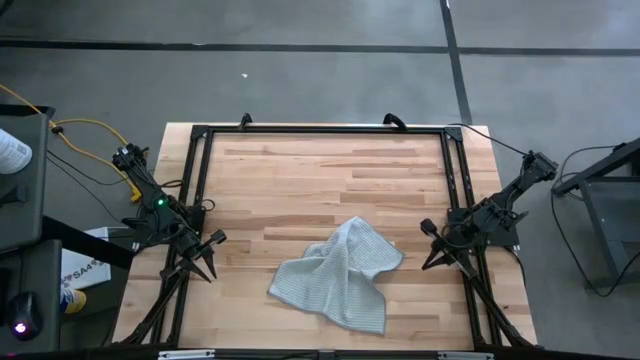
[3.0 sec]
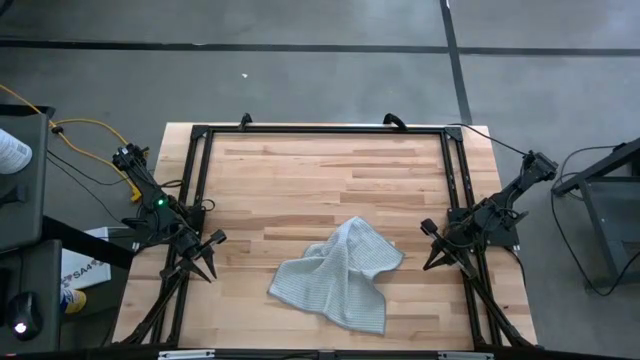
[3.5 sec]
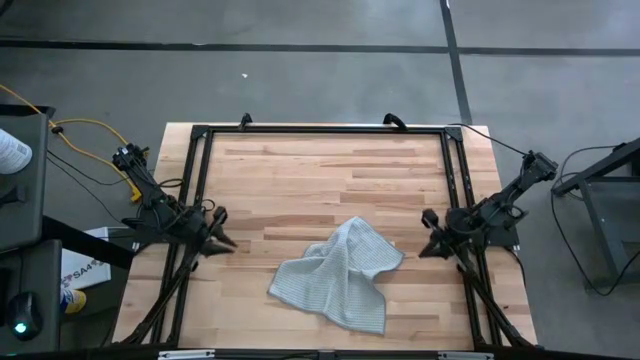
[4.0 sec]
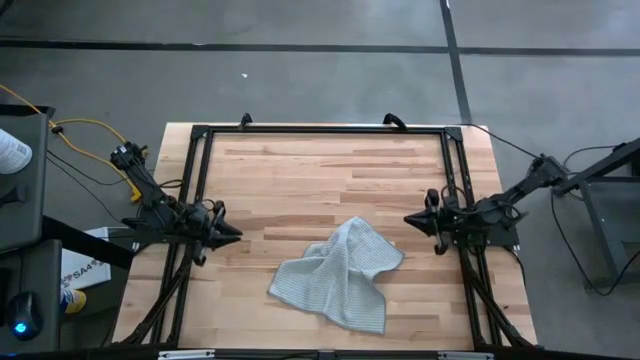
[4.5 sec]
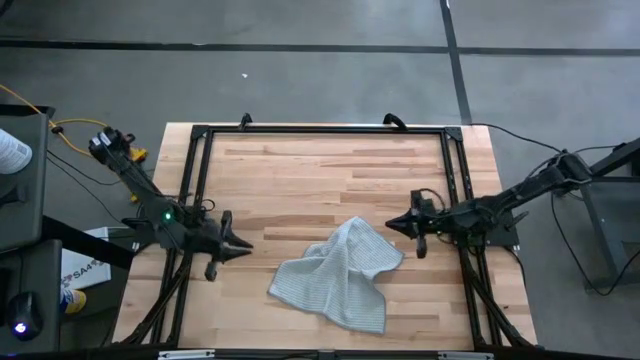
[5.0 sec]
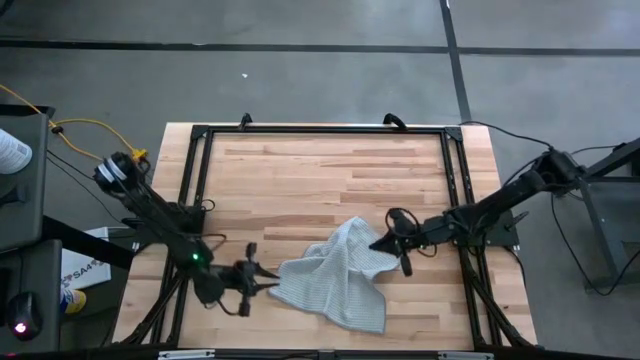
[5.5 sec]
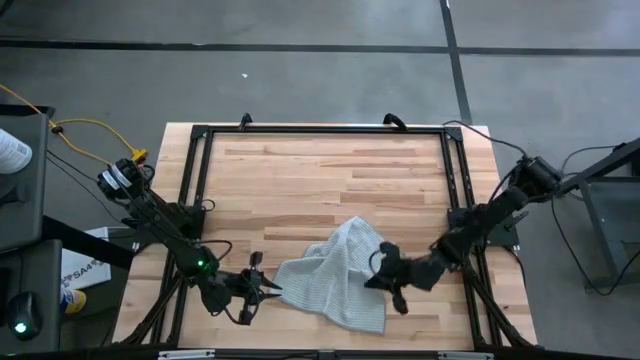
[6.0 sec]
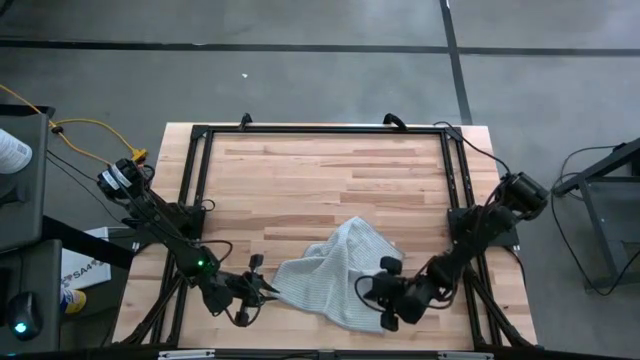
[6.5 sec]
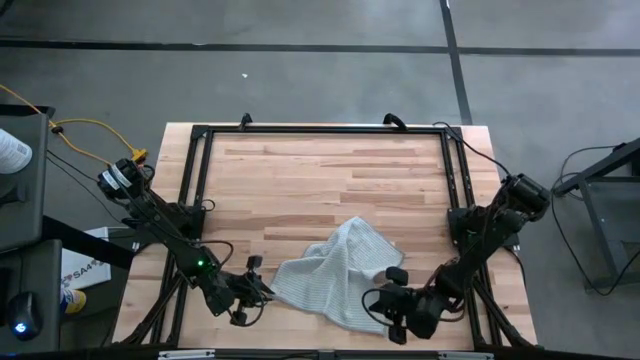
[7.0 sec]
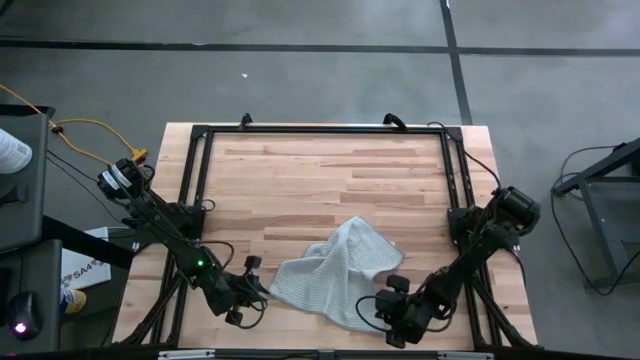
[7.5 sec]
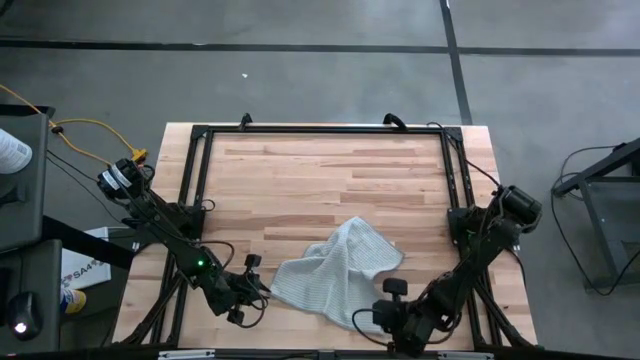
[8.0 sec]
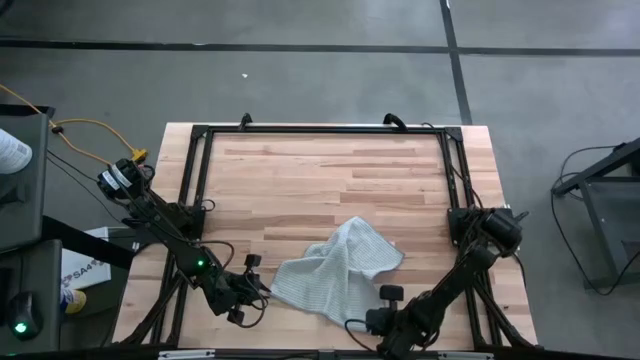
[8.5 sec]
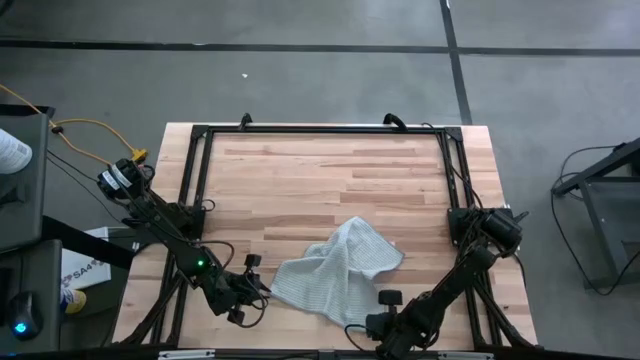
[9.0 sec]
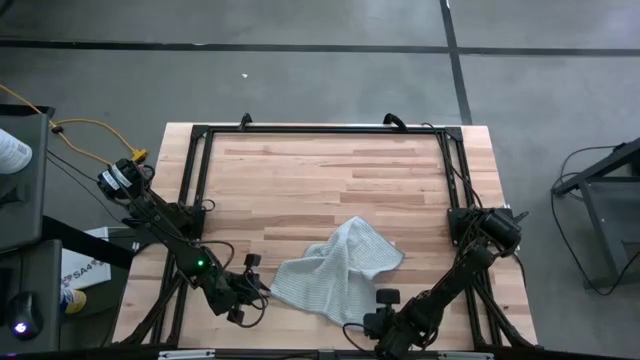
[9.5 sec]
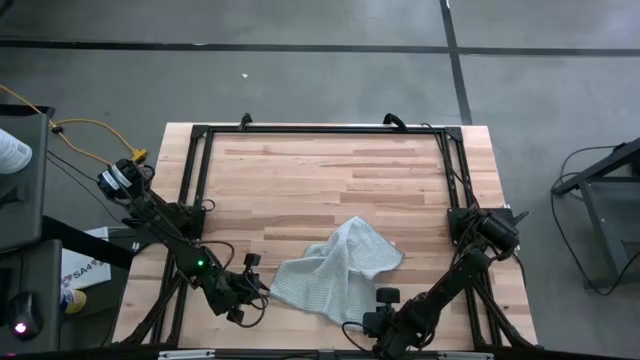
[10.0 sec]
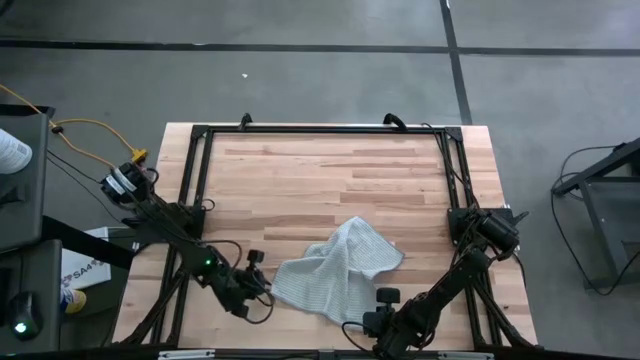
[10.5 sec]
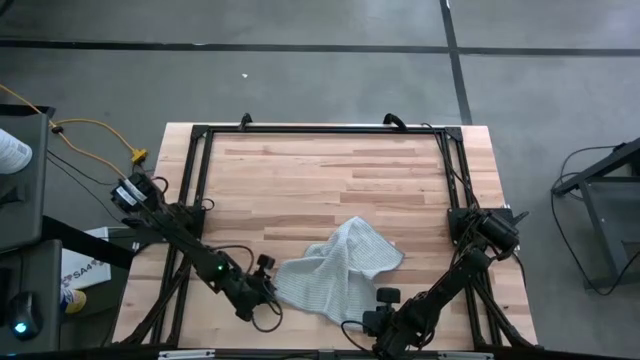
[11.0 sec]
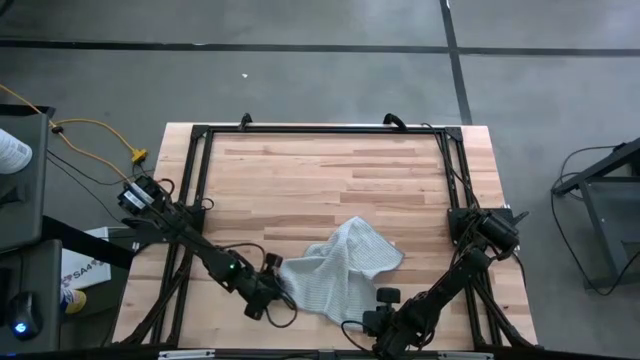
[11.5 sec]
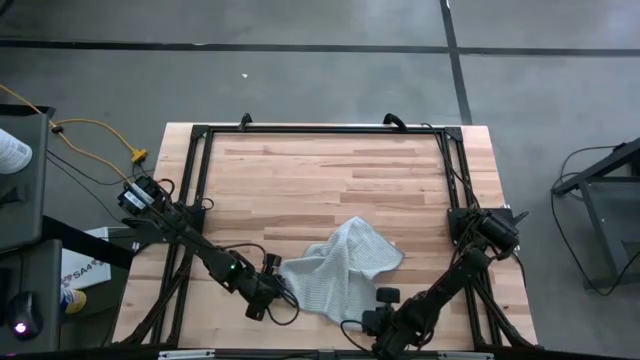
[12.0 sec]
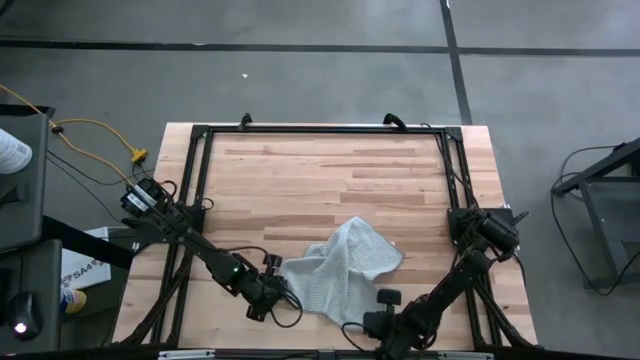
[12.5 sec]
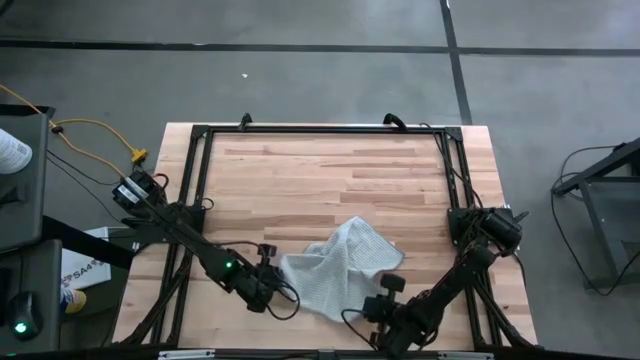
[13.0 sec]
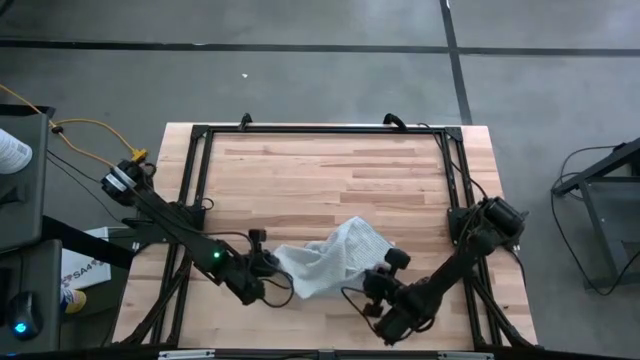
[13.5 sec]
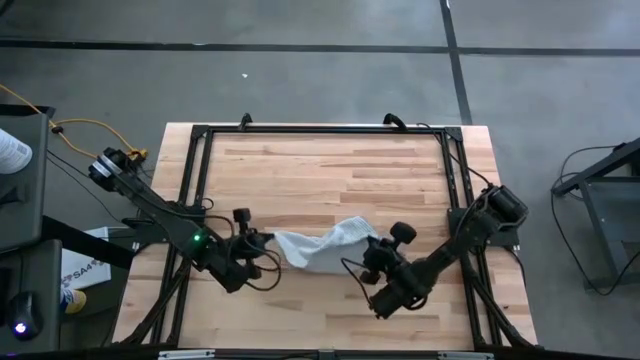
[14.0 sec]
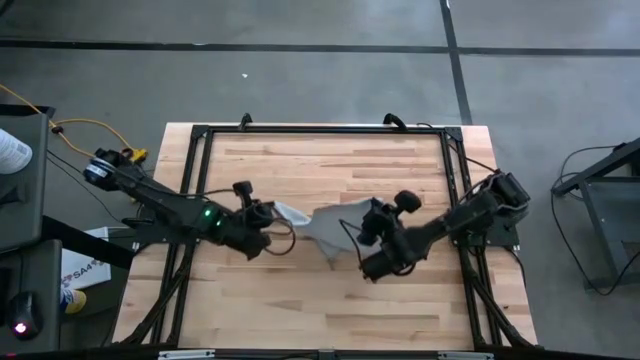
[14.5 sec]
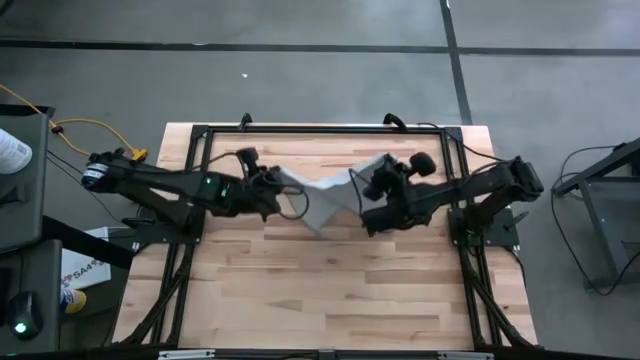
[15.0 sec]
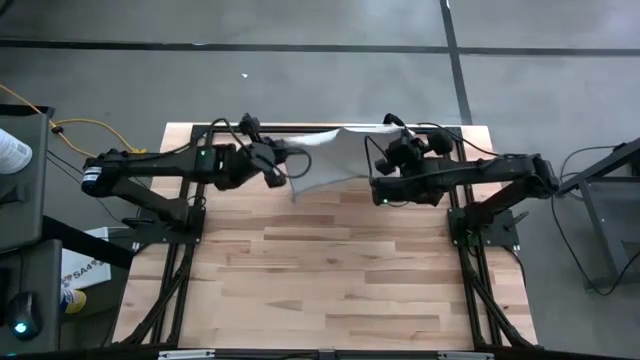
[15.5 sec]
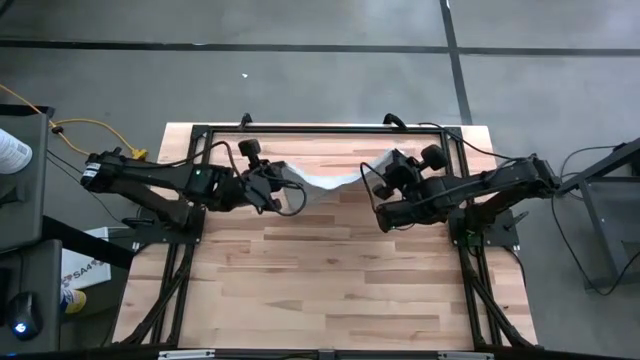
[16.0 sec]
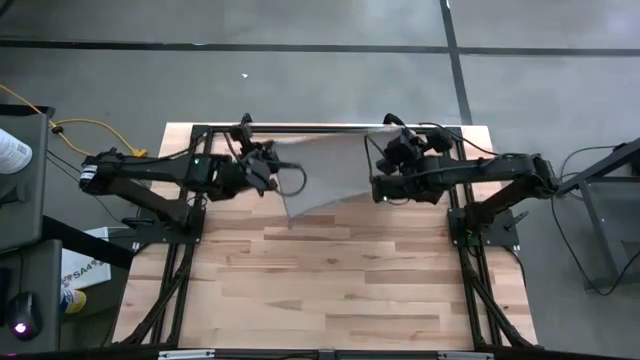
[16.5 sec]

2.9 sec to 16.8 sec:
Task: Fold microfiber towels
Fold the gray microfiber cloth

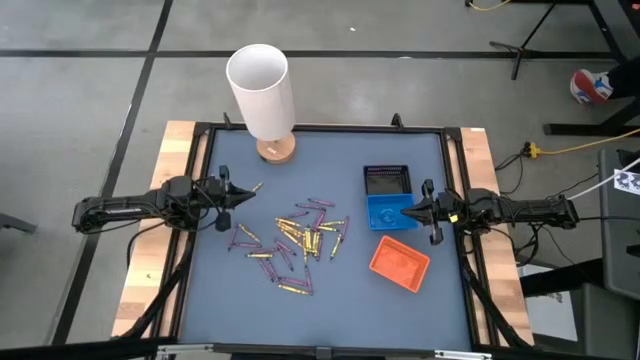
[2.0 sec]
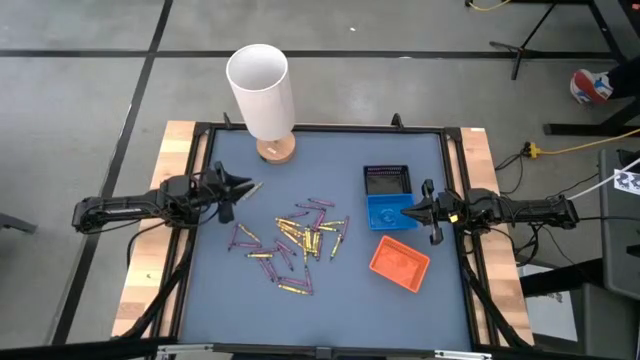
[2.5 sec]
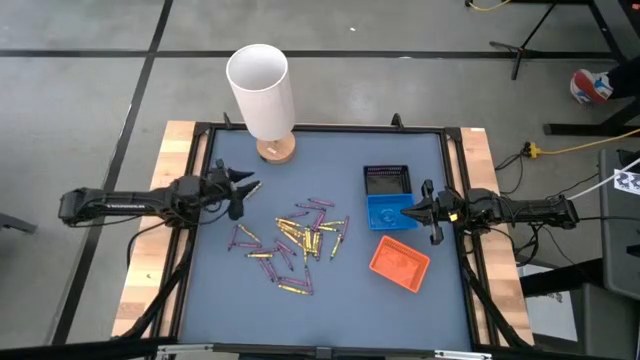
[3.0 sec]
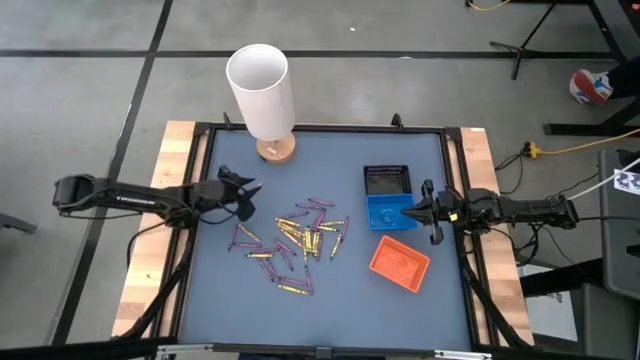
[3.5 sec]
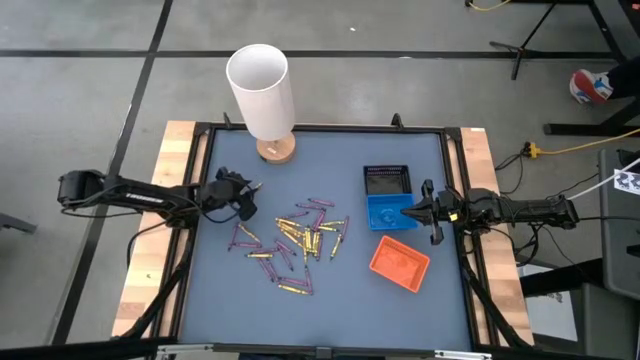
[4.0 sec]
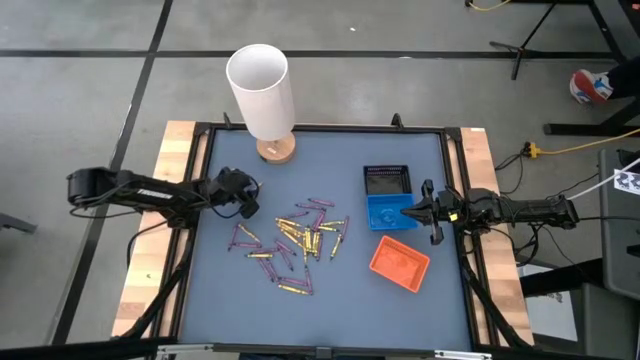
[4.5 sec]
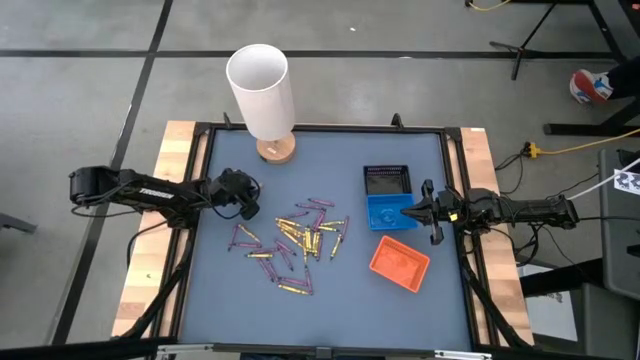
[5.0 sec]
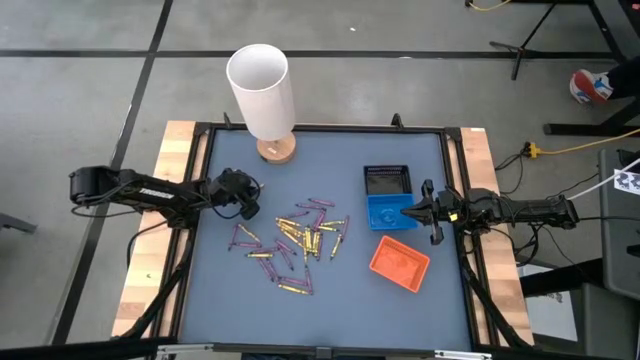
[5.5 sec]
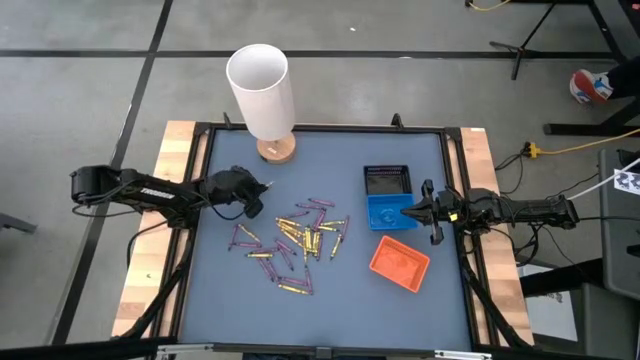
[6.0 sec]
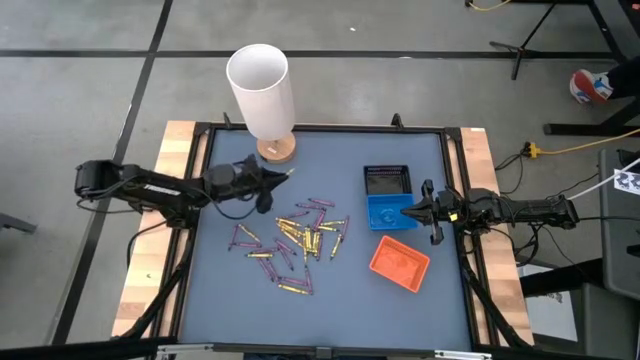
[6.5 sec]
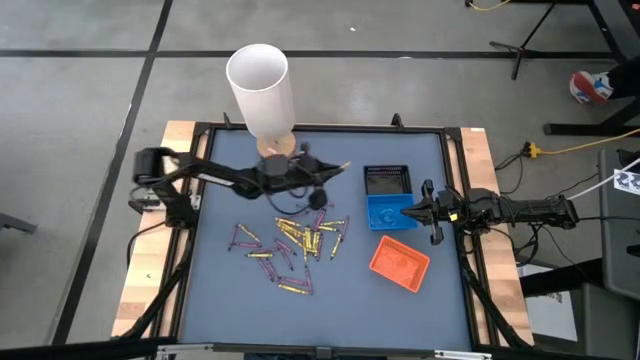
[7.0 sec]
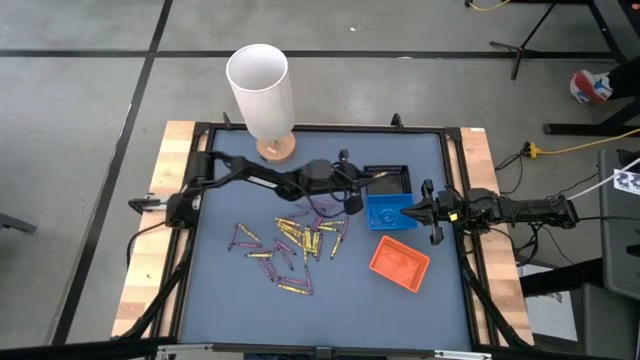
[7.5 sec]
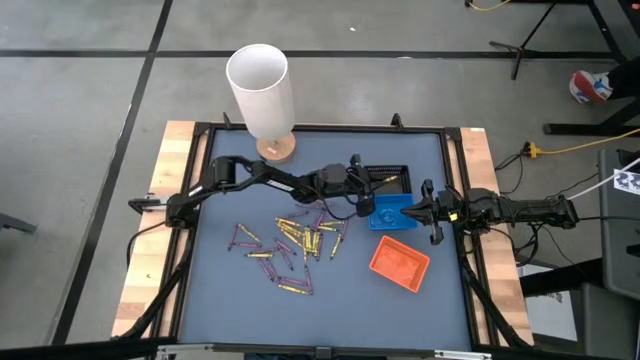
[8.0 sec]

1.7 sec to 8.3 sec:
Task: Sort crayons
Put the yellow crayon into the black bin
